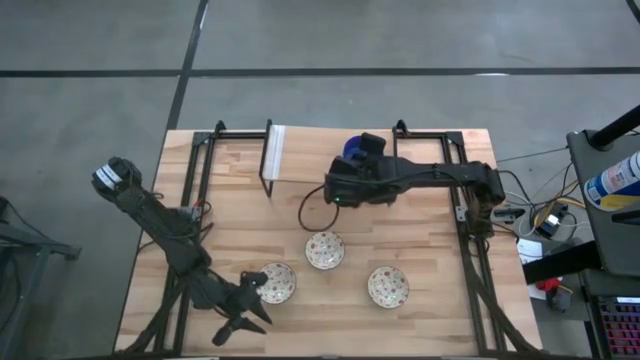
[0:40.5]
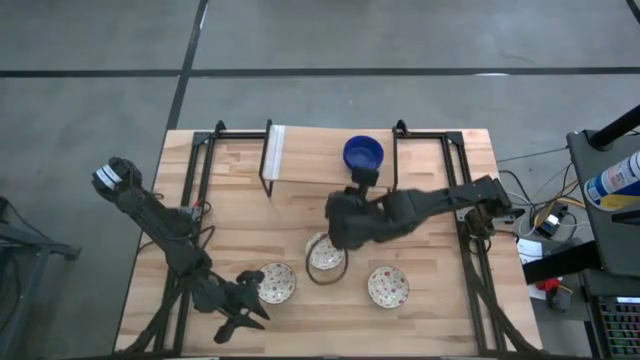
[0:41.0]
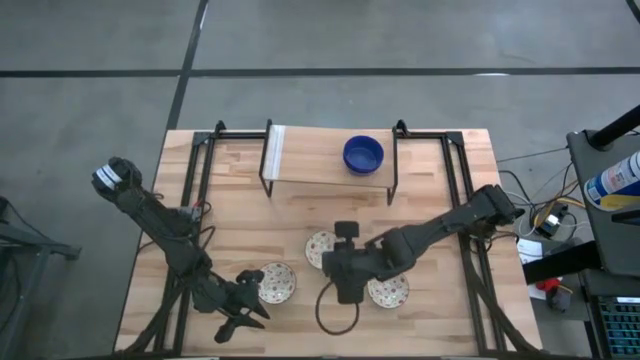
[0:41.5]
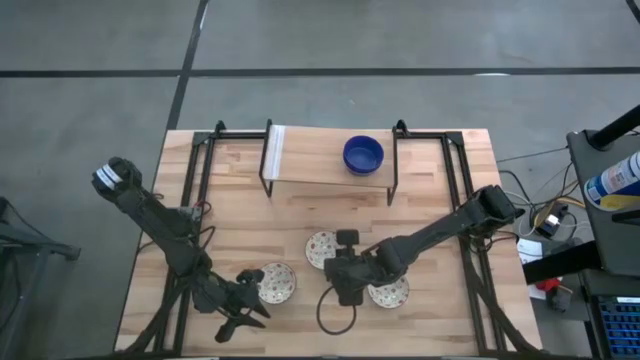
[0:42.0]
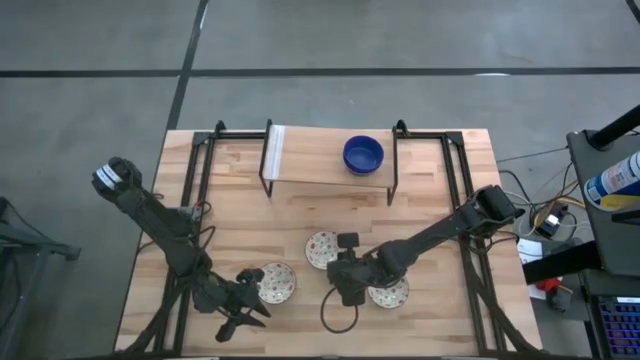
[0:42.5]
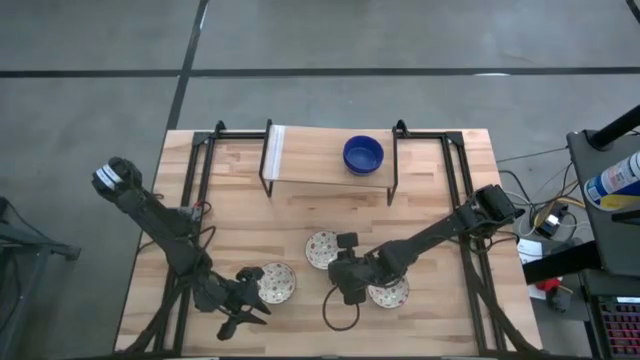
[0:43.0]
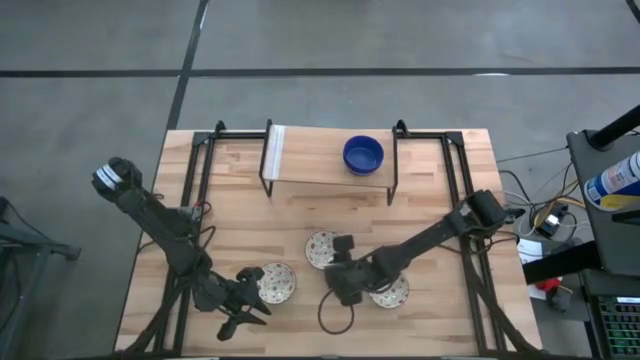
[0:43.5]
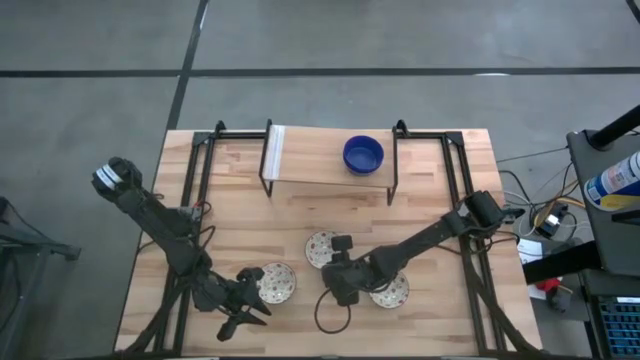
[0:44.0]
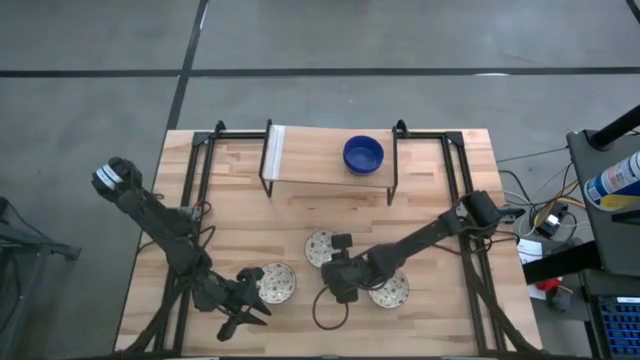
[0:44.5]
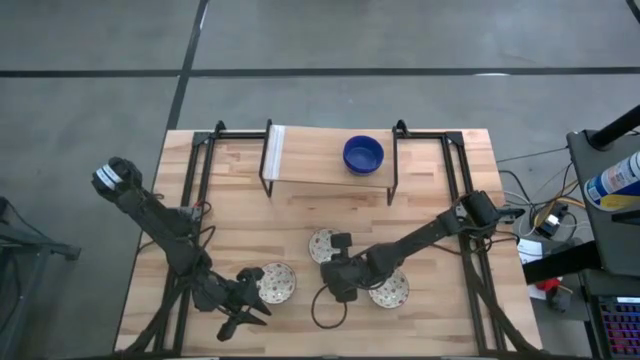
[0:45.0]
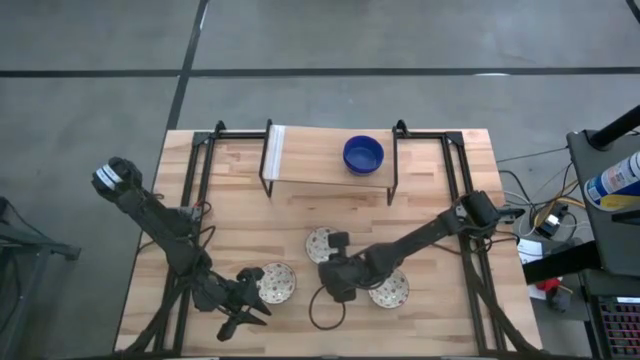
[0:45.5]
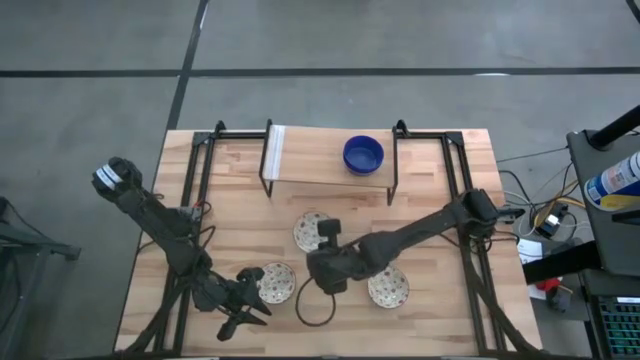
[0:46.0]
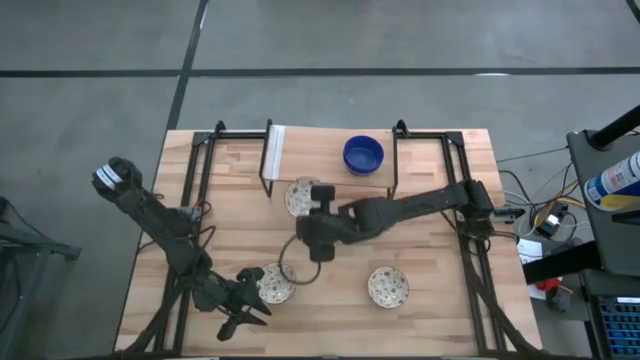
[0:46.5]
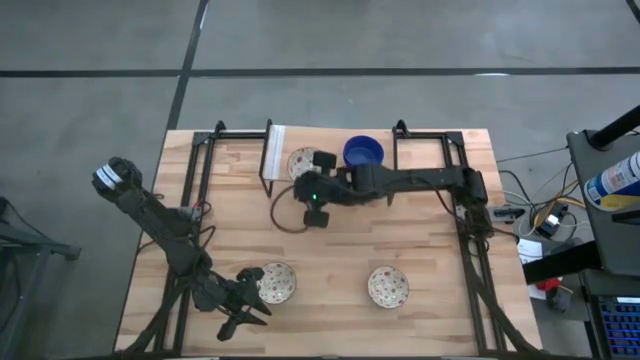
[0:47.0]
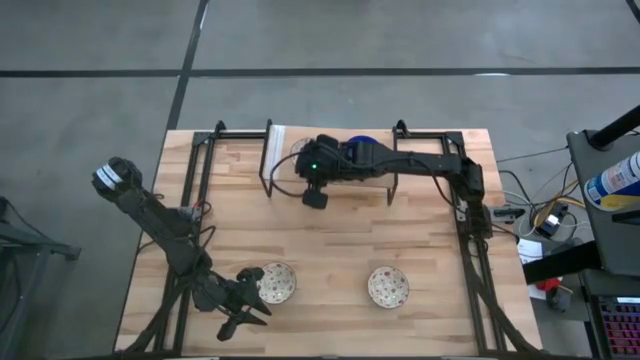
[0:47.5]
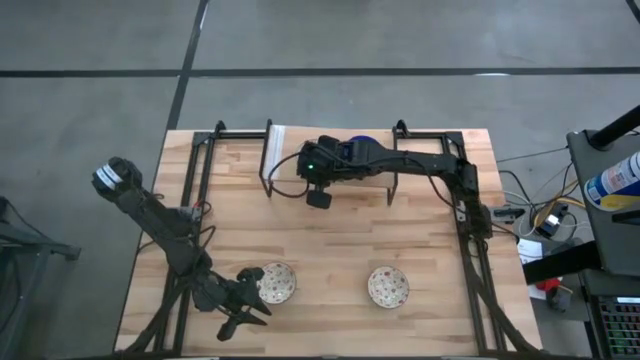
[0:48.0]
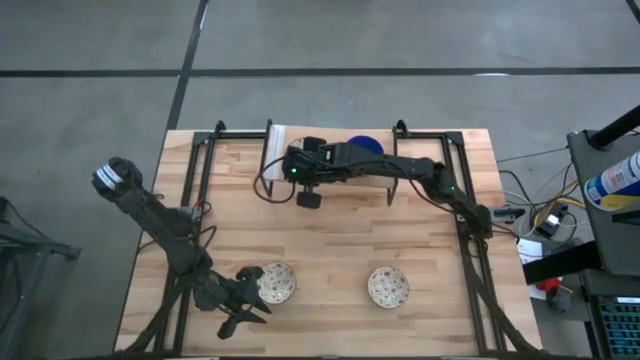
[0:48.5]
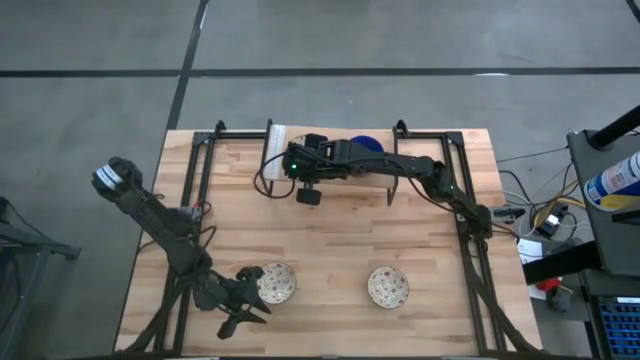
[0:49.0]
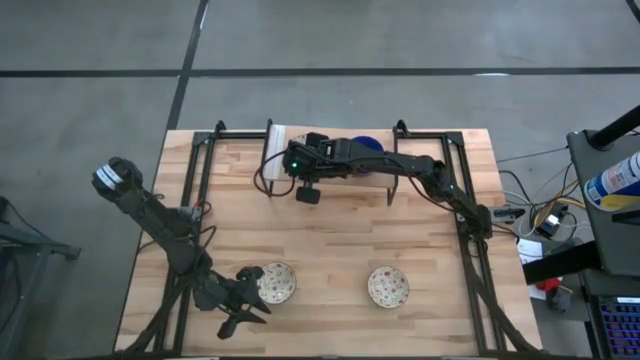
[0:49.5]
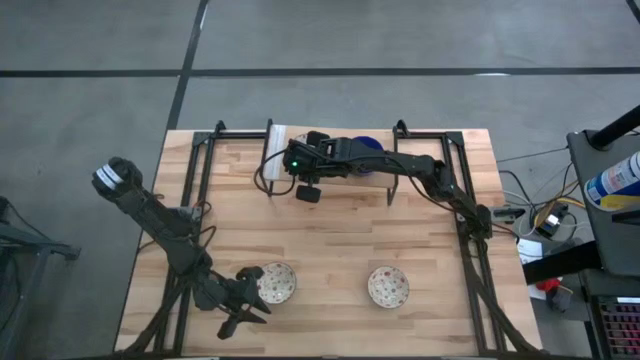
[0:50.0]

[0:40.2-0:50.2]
Task: Pick & Place Mini bowls
Put the top red patterned bowl on the shelf

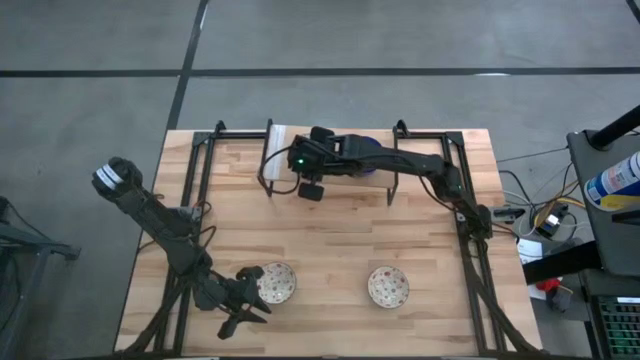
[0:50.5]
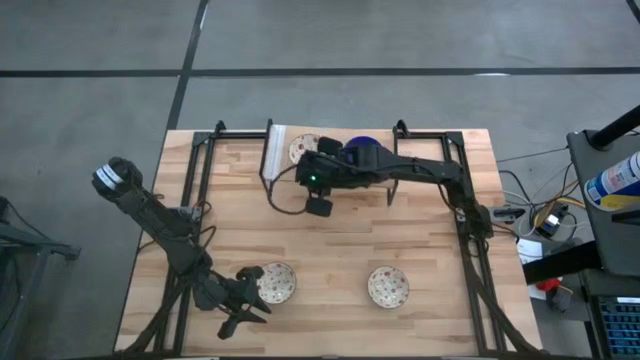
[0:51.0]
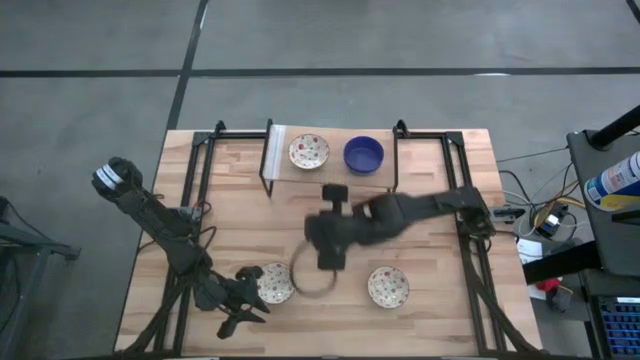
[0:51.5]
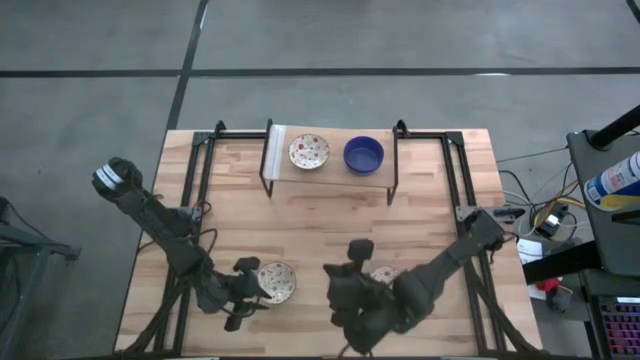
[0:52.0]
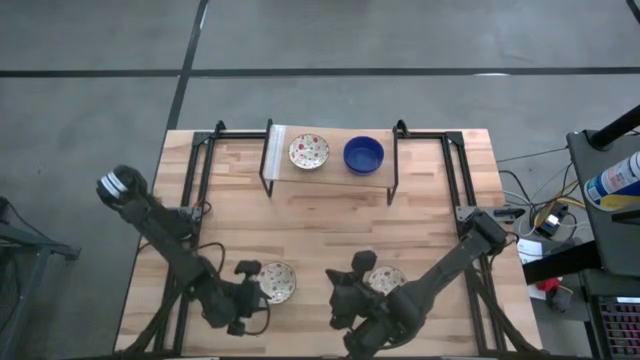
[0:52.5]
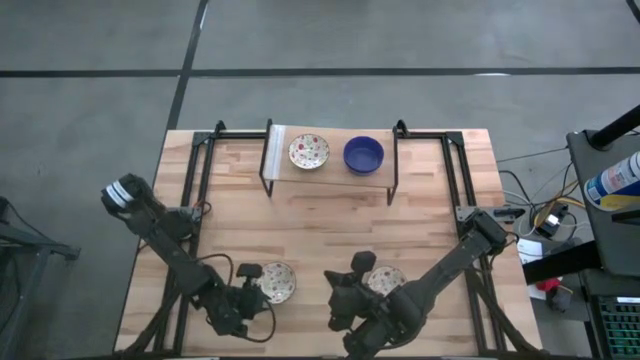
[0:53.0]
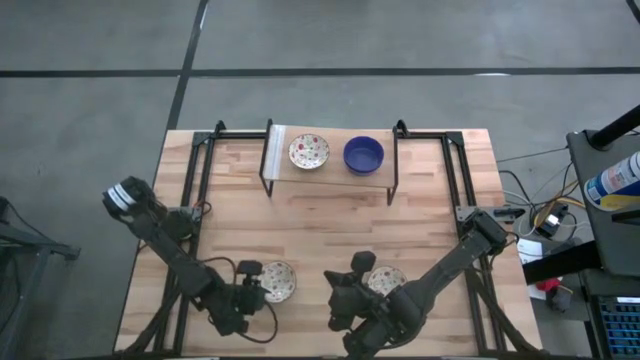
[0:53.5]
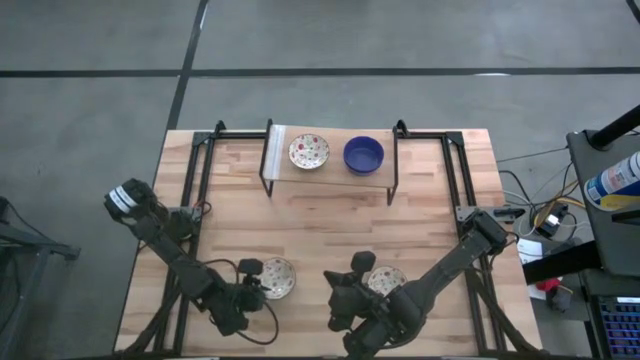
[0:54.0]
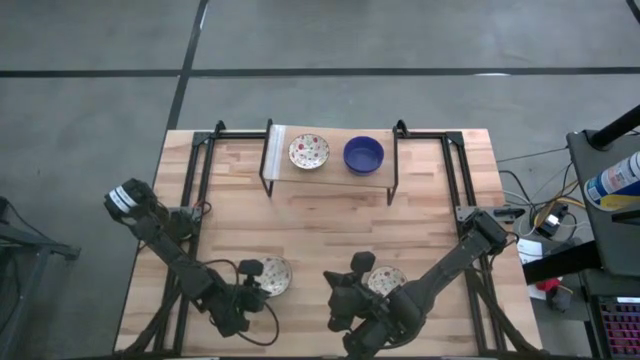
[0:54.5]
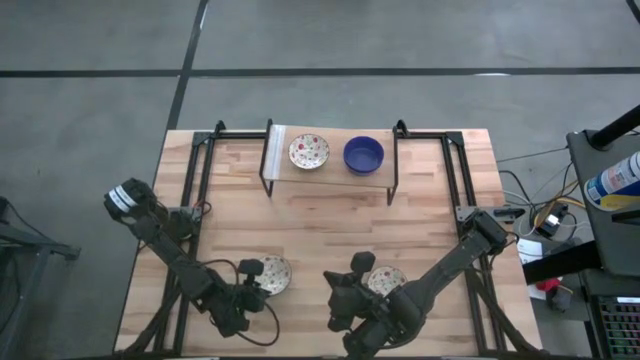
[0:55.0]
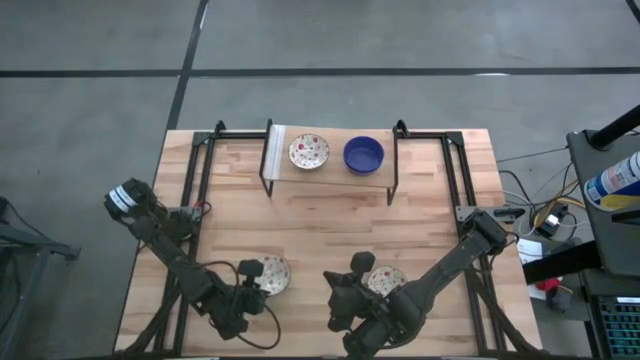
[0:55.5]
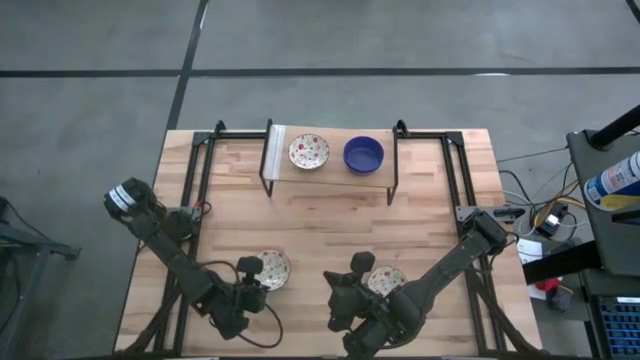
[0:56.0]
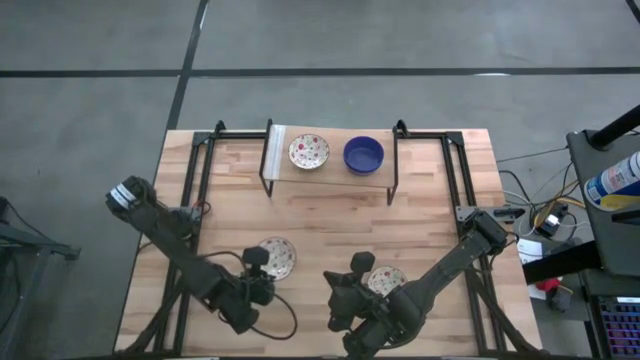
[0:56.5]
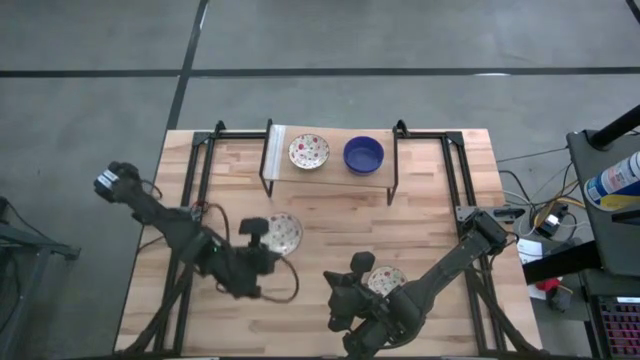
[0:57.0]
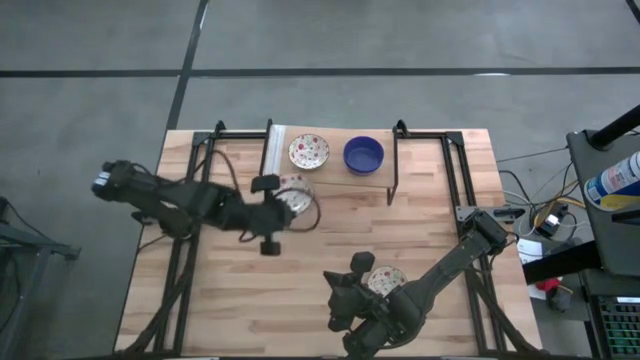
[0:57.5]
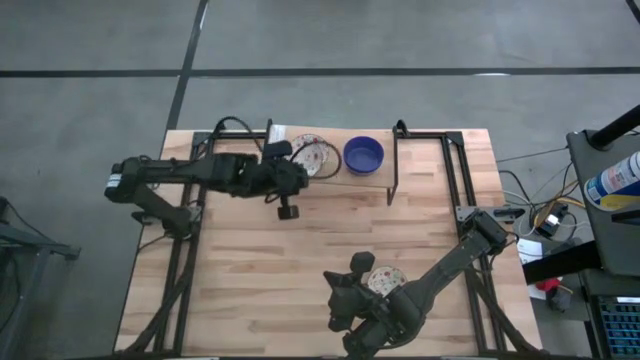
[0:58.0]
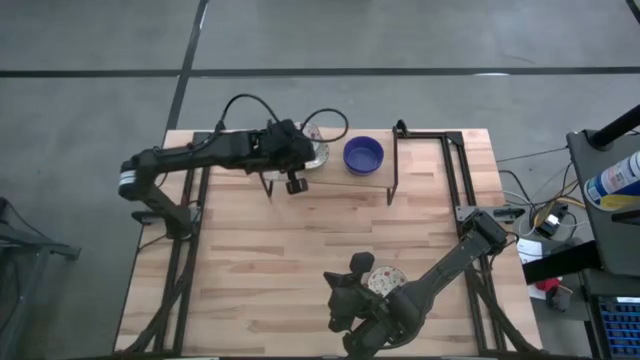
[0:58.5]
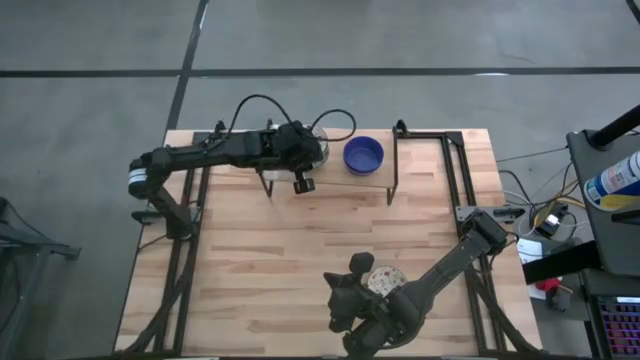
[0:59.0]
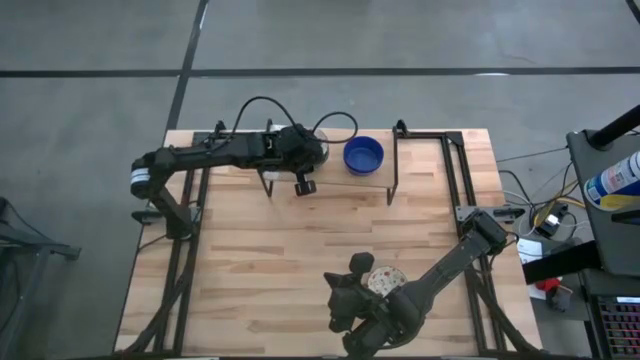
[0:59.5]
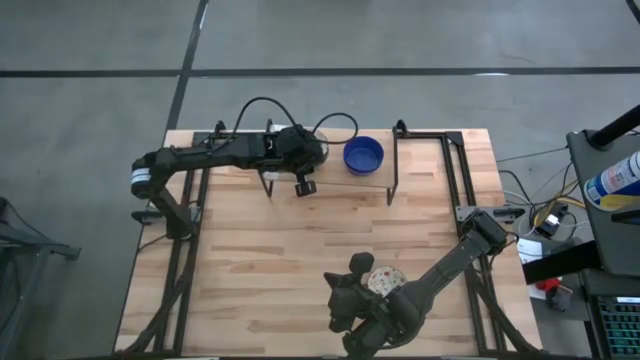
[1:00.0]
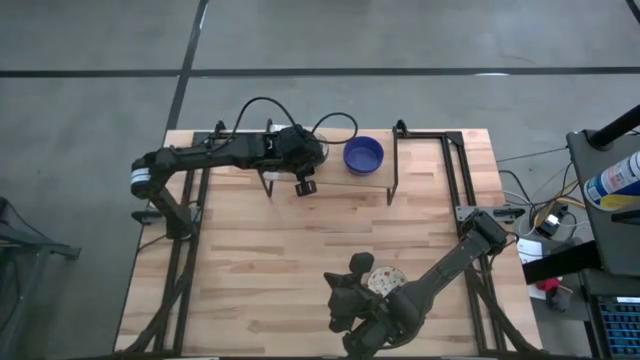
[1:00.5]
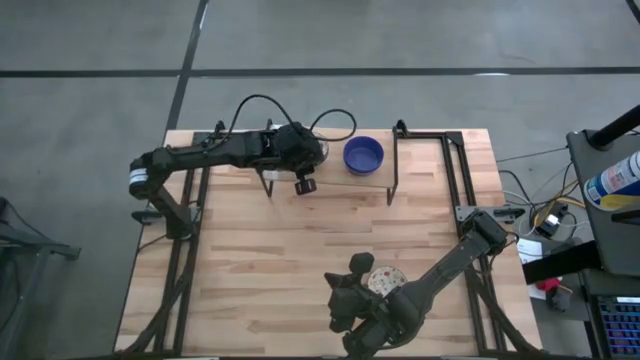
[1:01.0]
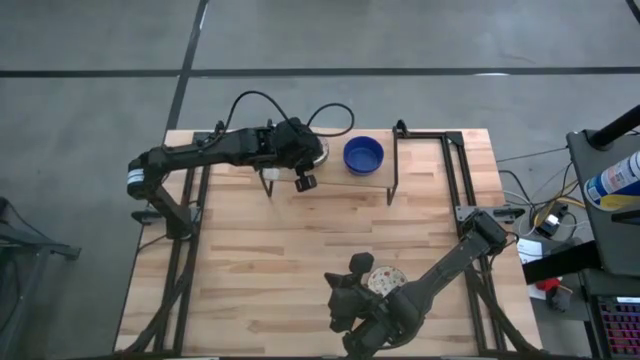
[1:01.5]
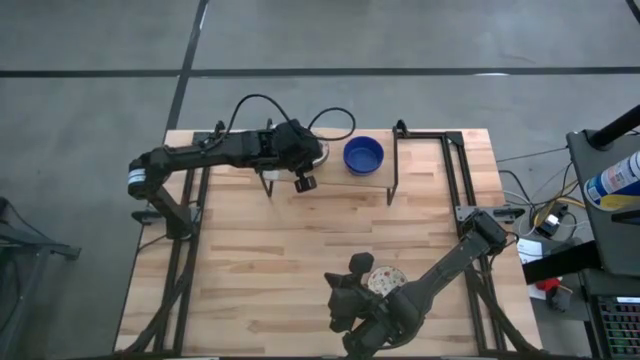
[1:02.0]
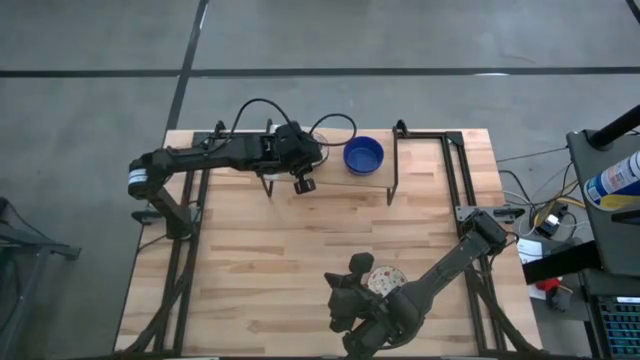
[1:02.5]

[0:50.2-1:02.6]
Stack the left red patterned bowl on the red patterned bowl on the shelf
